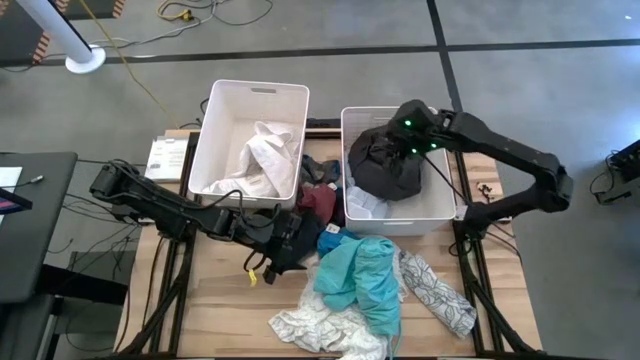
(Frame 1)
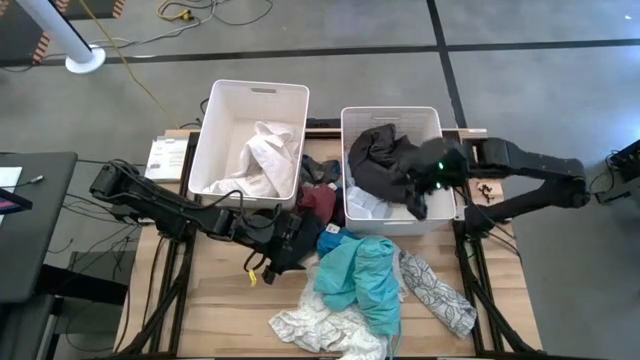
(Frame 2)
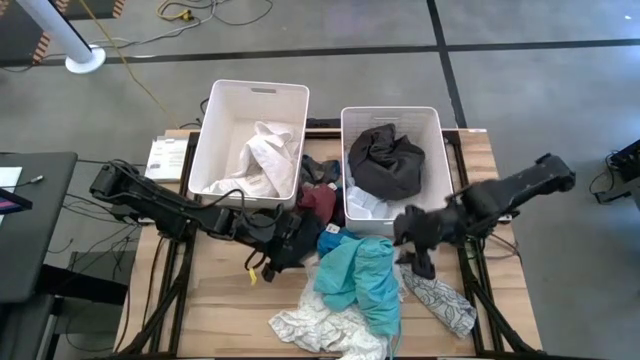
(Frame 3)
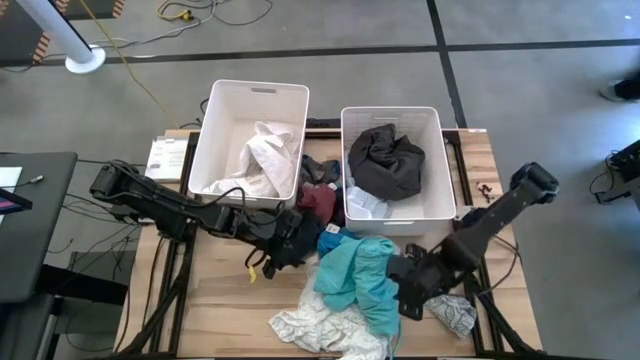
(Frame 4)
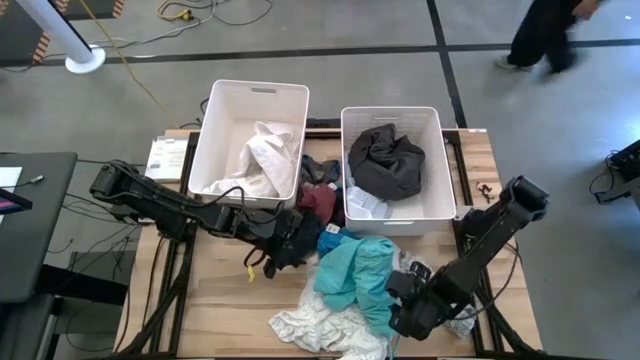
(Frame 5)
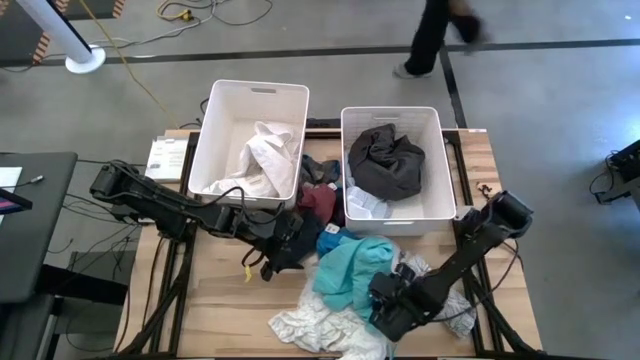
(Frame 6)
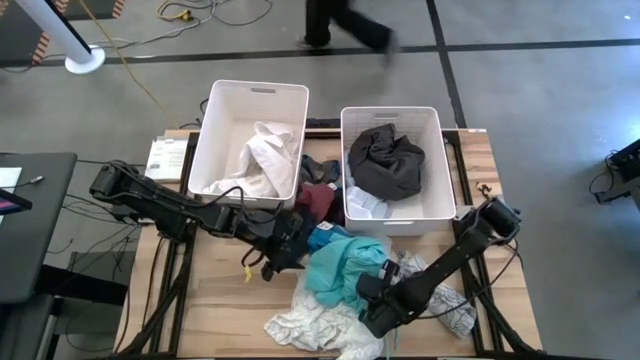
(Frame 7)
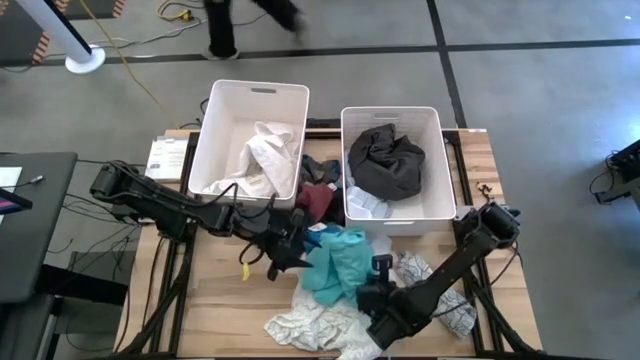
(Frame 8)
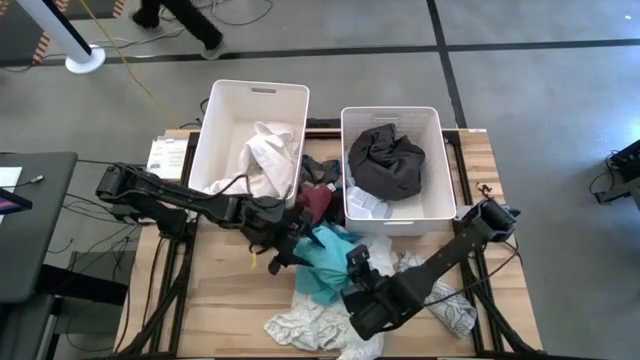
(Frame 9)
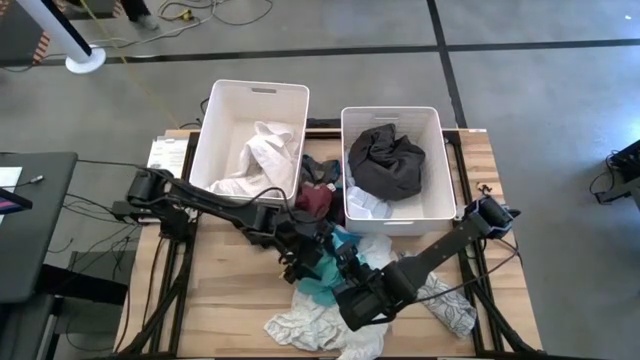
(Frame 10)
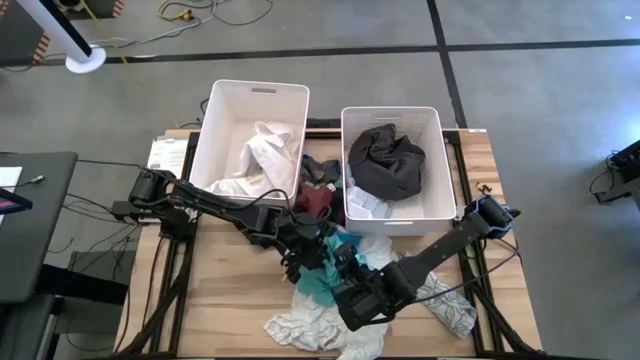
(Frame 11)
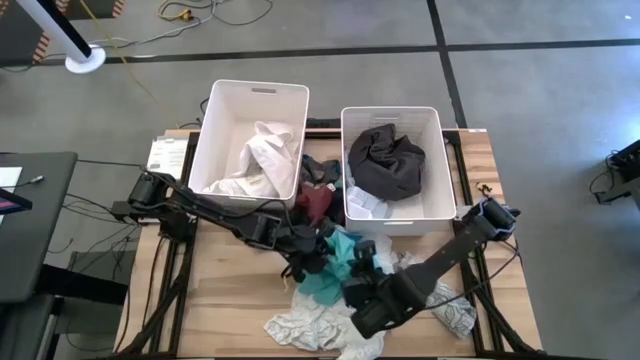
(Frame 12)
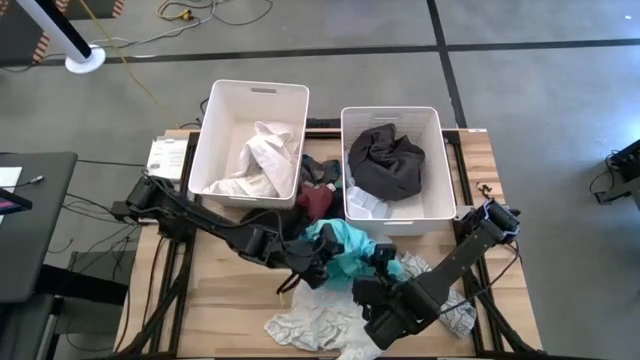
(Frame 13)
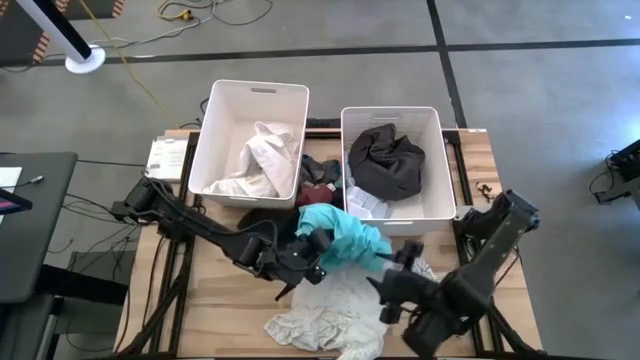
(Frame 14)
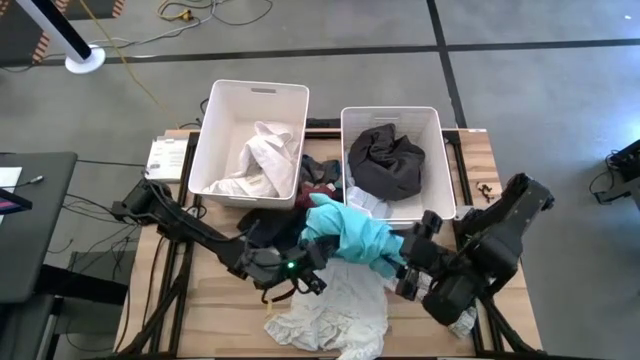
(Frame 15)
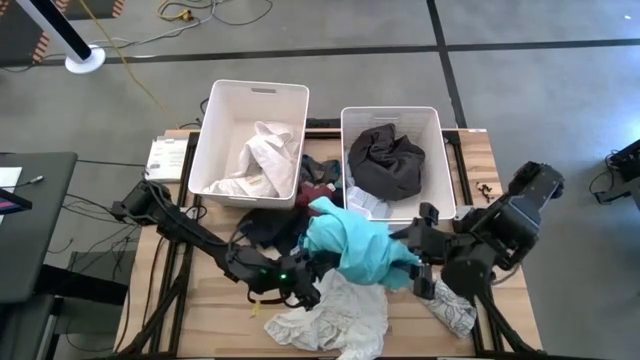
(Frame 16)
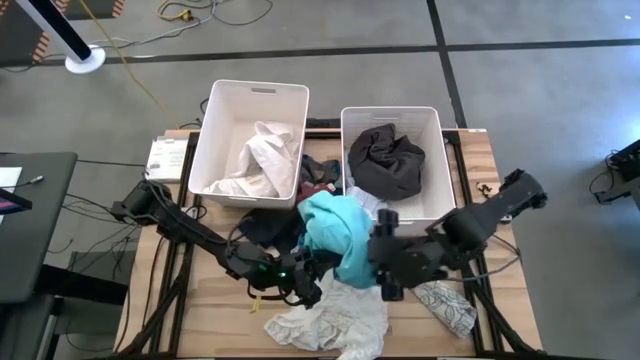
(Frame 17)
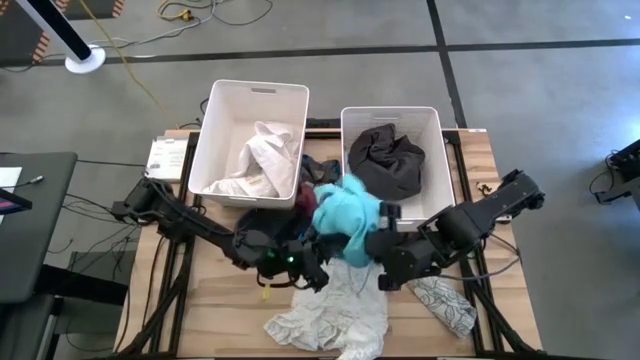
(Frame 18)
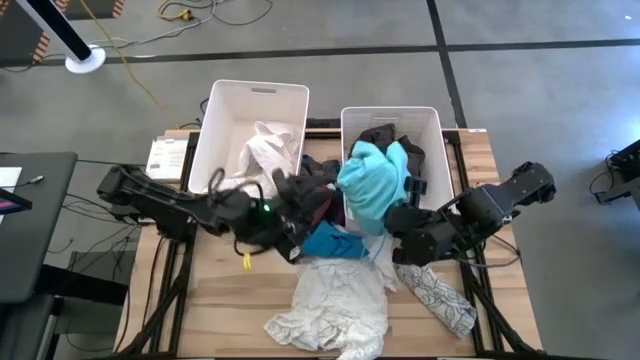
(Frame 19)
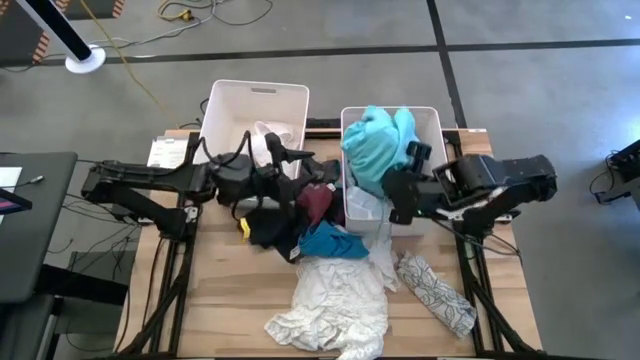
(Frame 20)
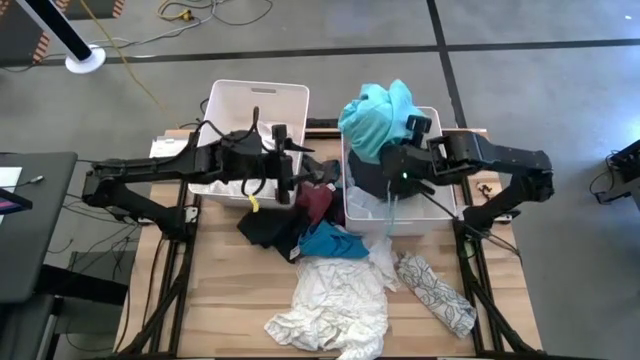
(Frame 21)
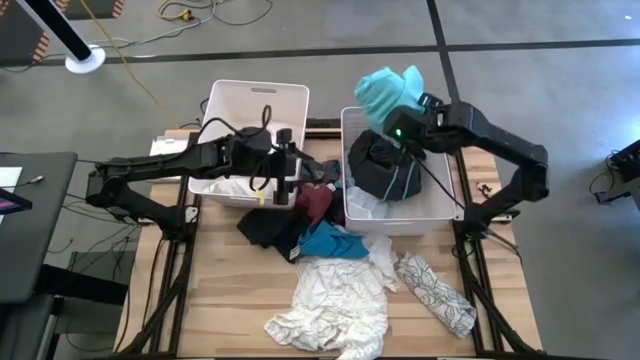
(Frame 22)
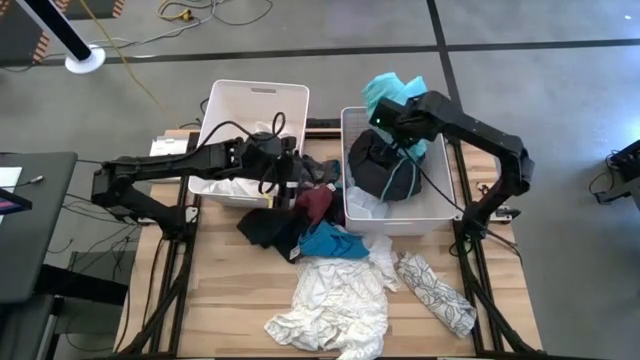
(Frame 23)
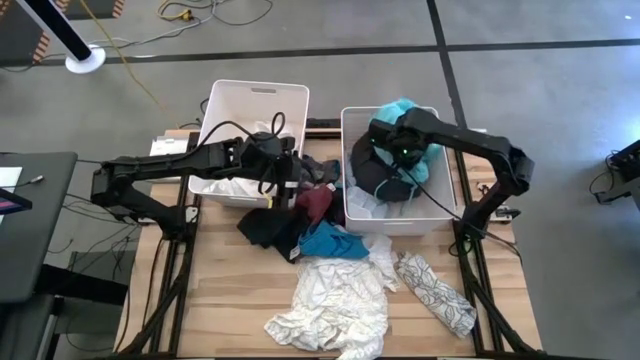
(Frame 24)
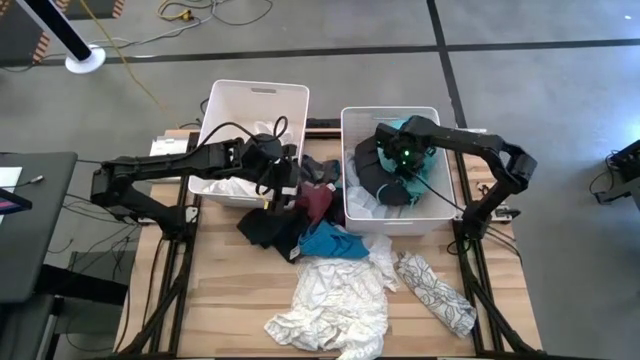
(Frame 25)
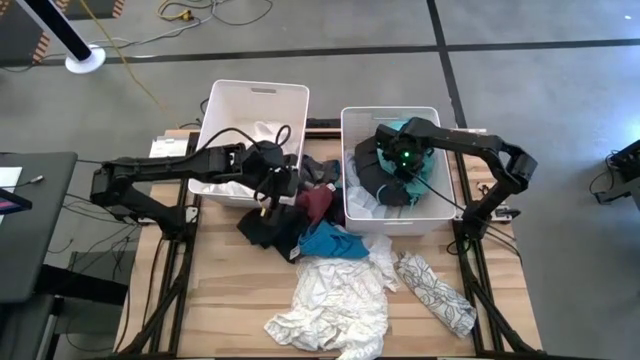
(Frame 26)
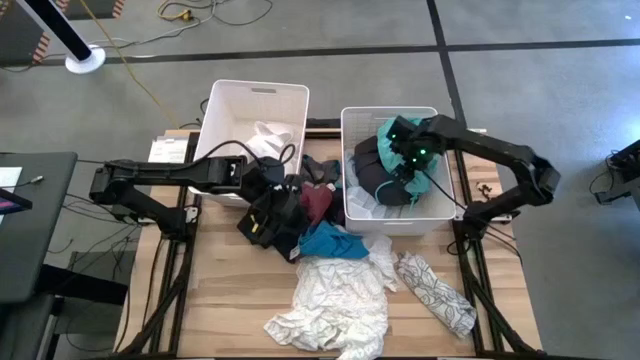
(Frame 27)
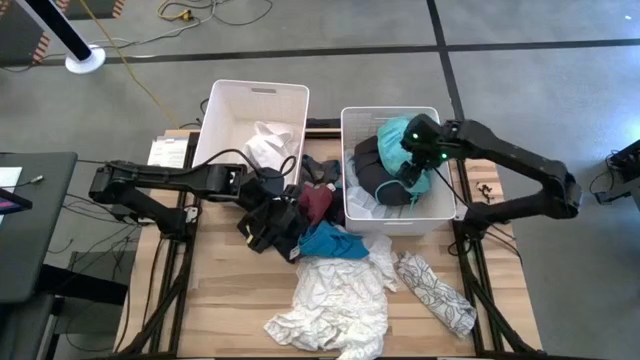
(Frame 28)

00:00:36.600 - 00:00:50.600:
Task: Sort clothes
Put the light blue pants into the right white laundry bin

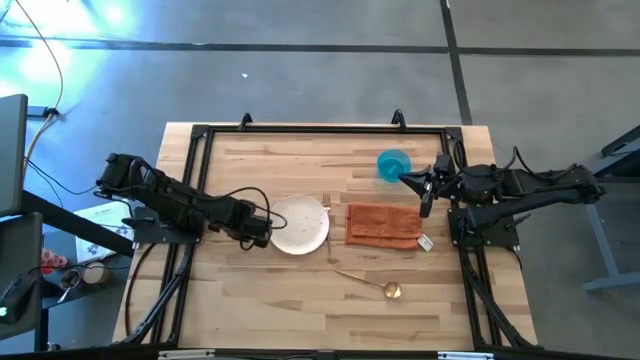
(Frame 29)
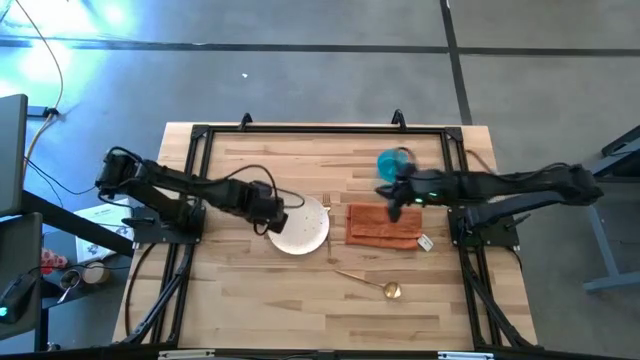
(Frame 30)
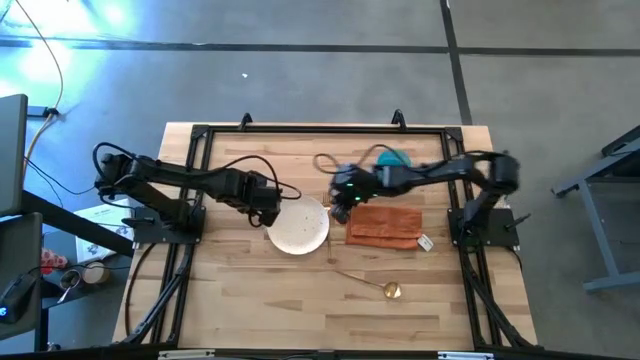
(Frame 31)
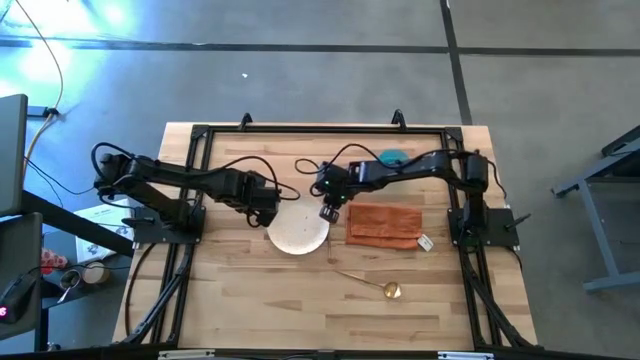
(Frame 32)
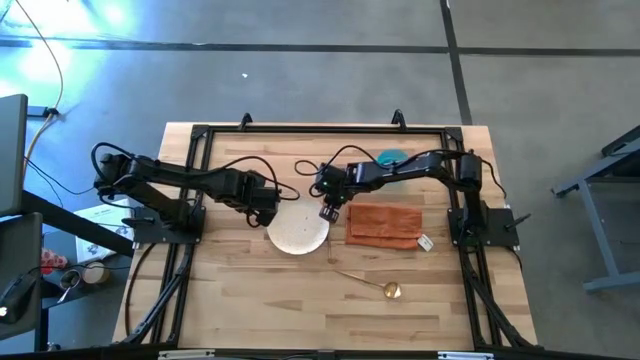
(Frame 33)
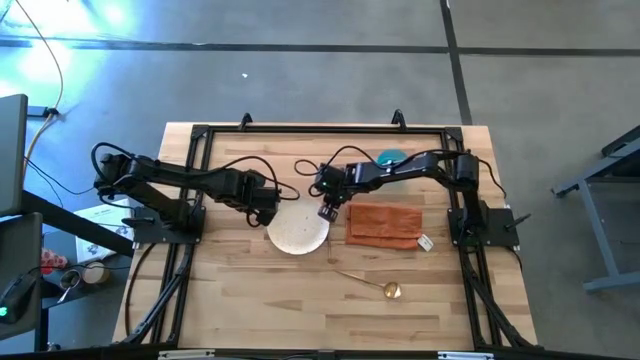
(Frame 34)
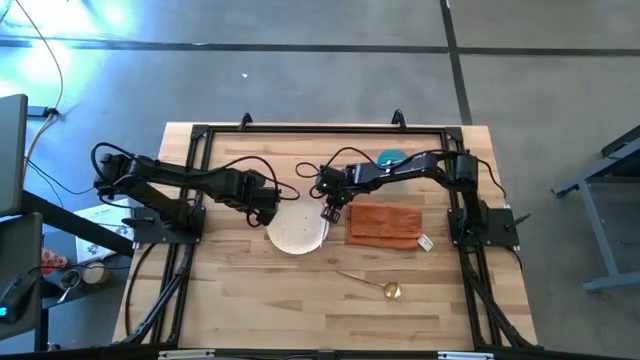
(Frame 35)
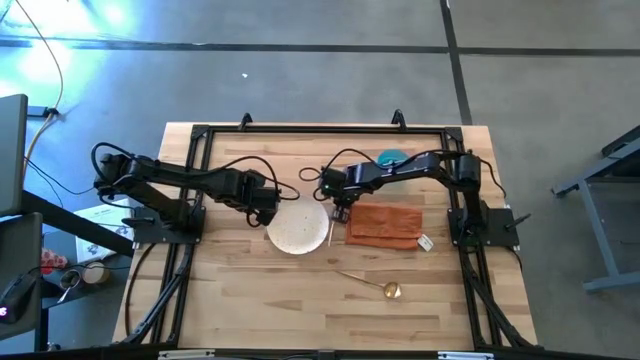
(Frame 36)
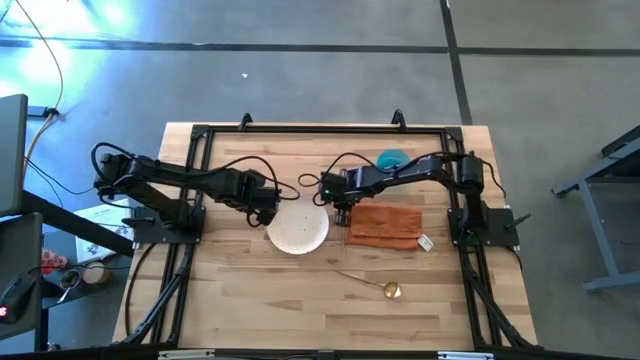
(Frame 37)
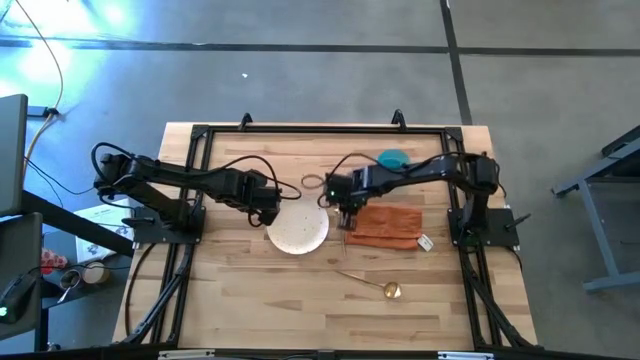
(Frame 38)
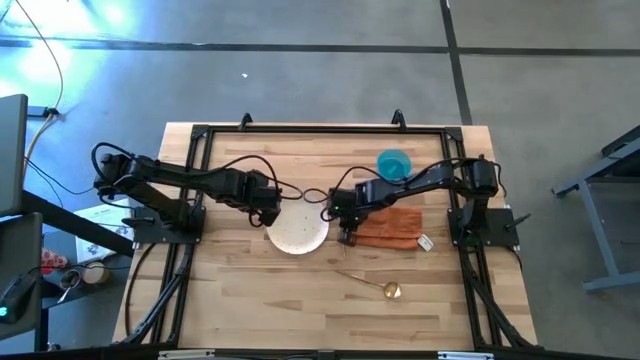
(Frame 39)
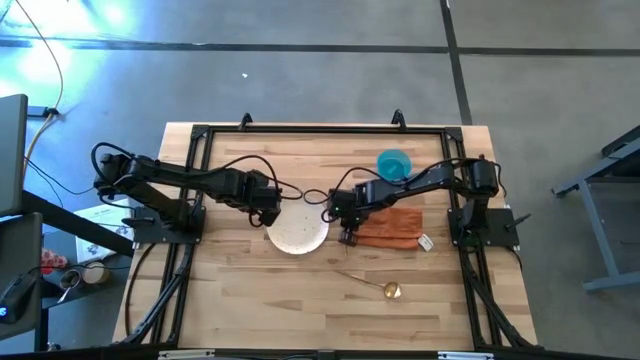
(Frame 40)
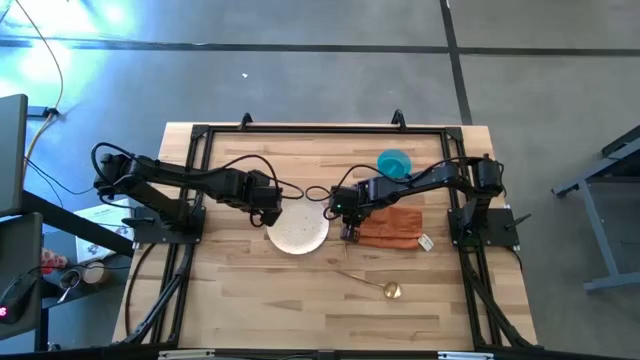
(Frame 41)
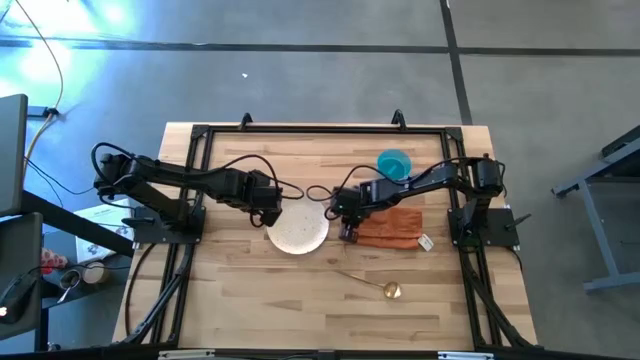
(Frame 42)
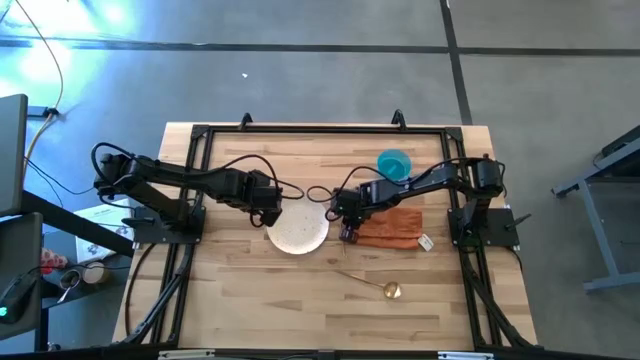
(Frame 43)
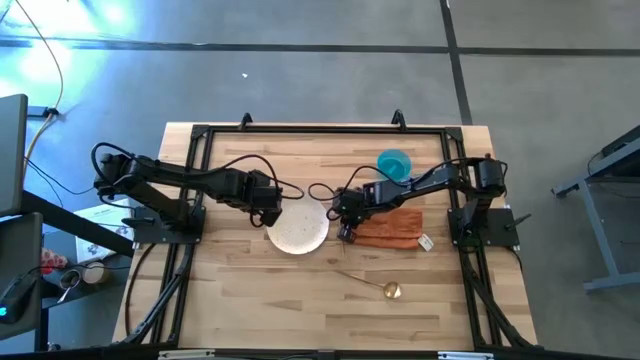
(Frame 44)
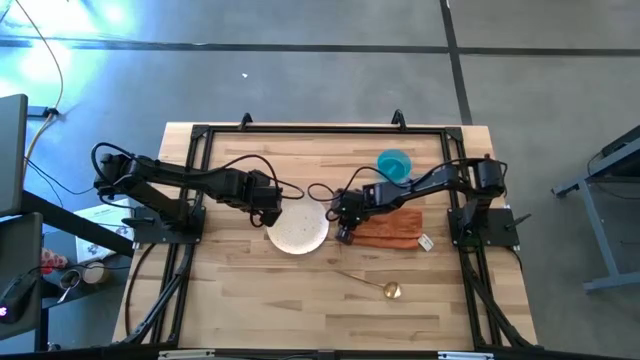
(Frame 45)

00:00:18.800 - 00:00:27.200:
Task: Set table place
Adjust the gold fork on the table
